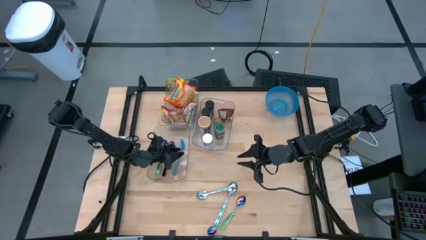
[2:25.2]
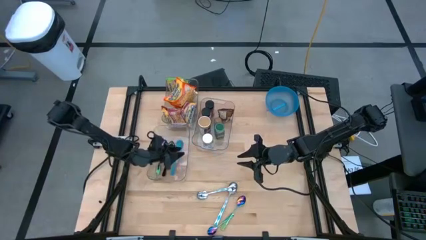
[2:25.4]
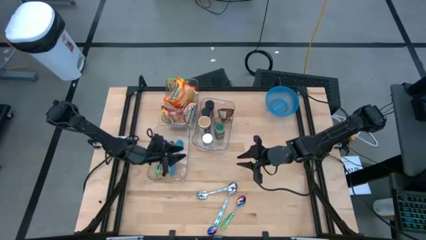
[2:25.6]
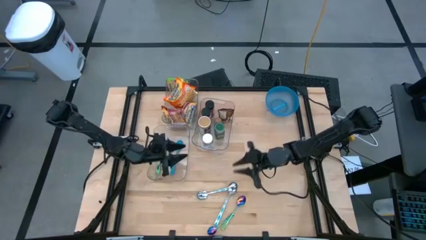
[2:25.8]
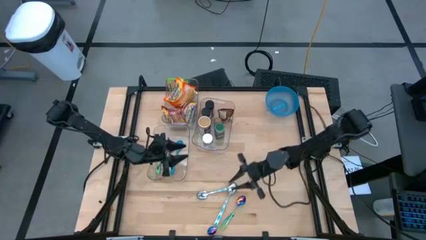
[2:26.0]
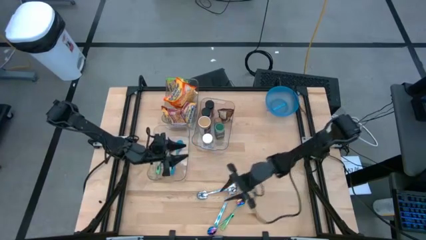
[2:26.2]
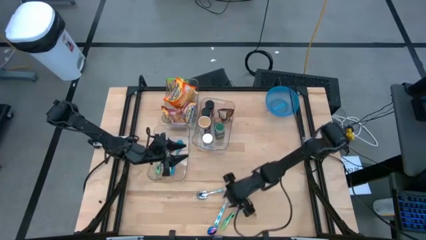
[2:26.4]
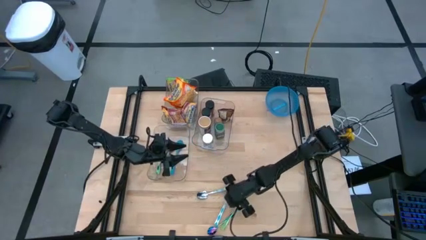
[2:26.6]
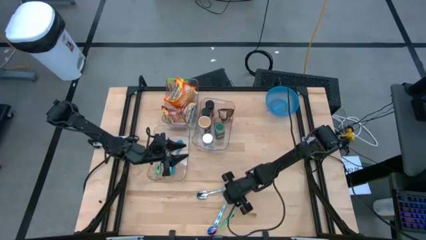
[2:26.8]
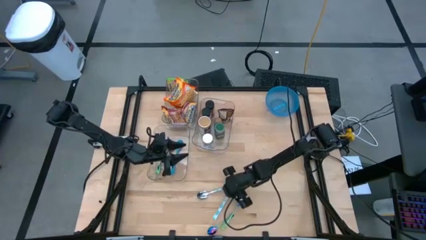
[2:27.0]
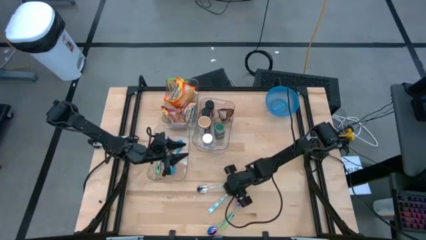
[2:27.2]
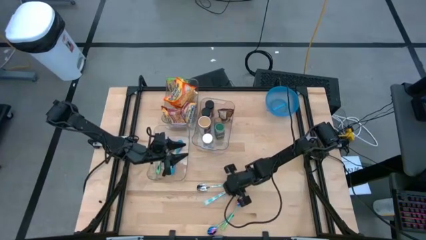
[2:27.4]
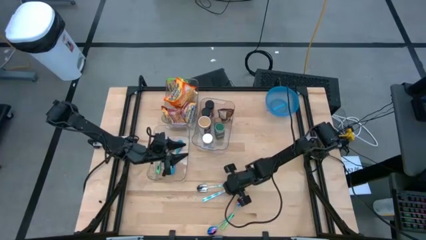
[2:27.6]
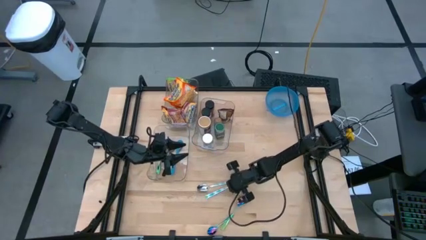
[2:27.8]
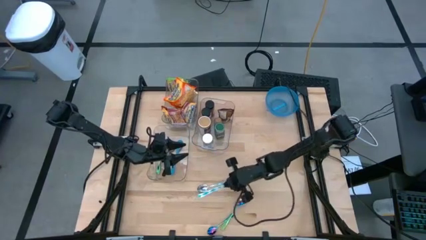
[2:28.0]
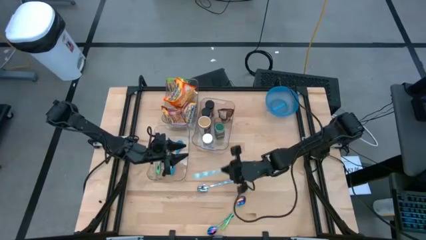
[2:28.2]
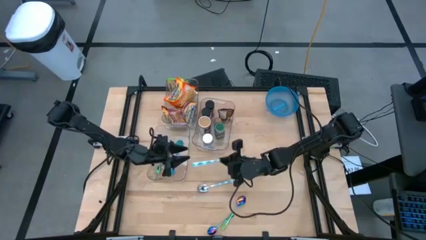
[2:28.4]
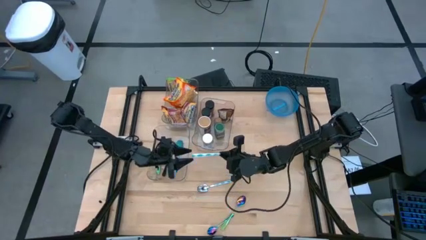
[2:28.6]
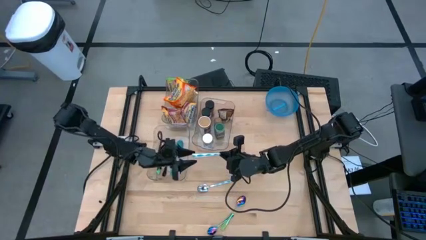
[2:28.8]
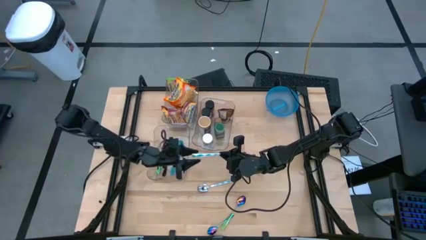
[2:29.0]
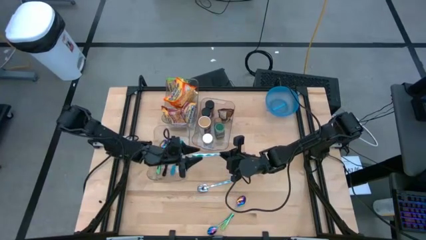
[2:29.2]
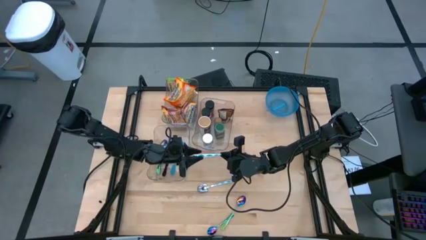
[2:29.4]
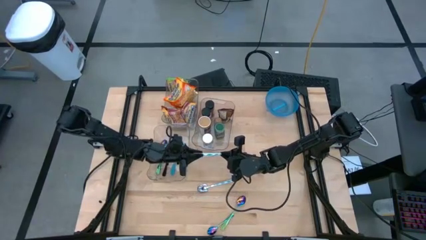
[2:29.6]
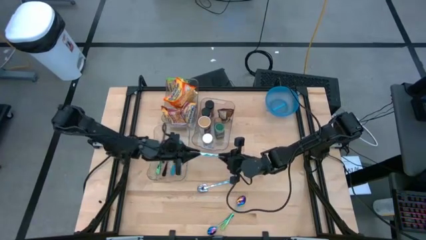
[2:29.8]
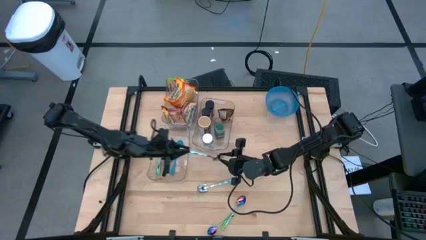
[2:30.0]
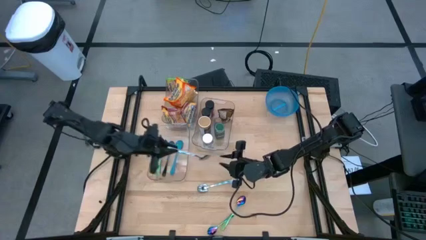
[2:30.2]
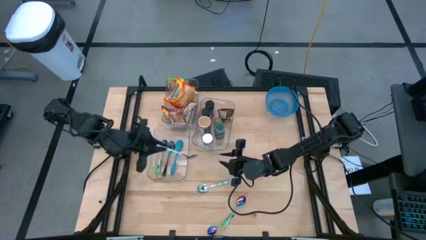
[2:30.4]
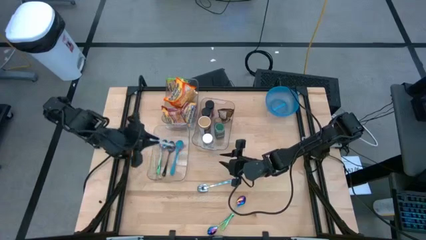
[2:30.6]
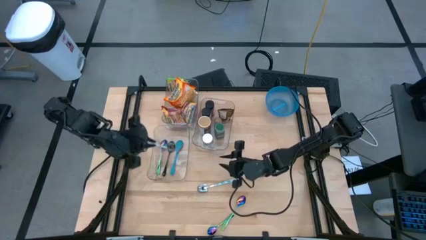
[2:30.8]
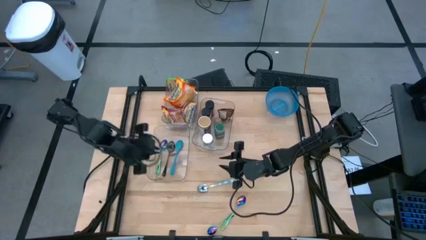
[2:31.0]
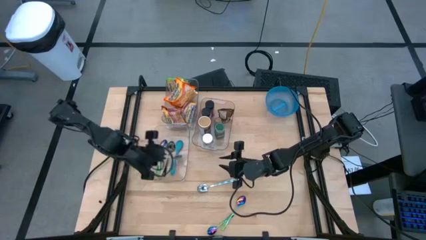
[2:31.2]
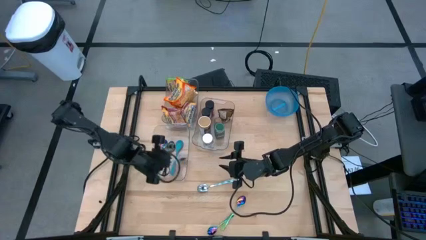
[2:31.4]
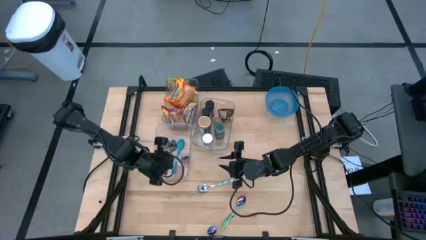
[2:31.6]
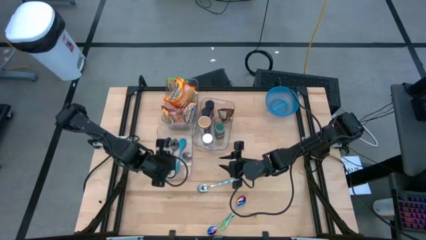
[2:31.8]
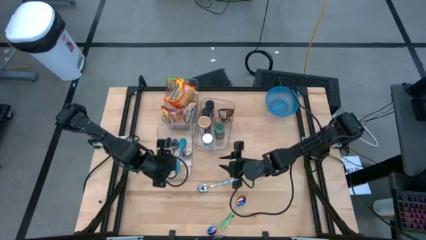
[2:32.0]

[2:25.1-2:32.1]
Task: Pick & Place Food Item
Put the right white patterned spoon into the bottom transparent bin

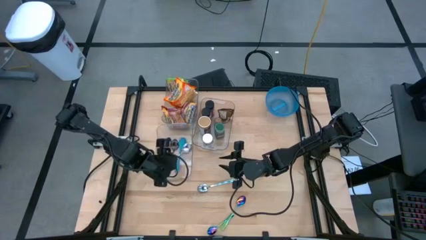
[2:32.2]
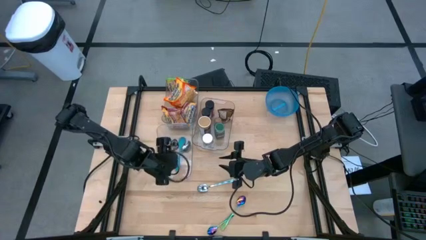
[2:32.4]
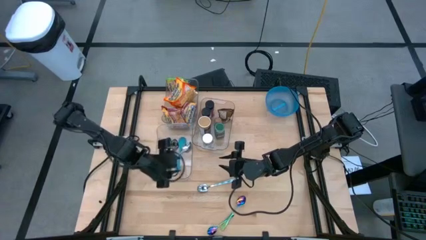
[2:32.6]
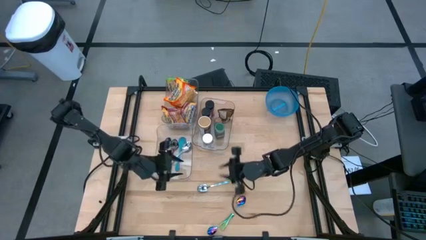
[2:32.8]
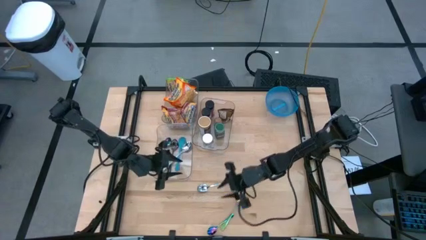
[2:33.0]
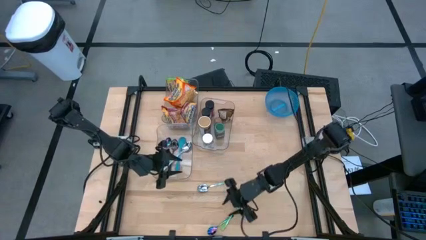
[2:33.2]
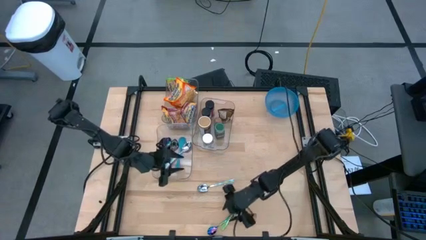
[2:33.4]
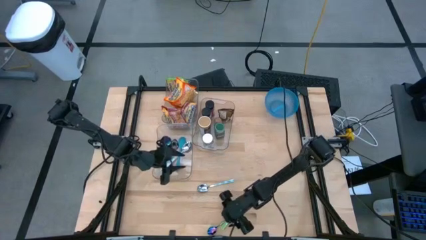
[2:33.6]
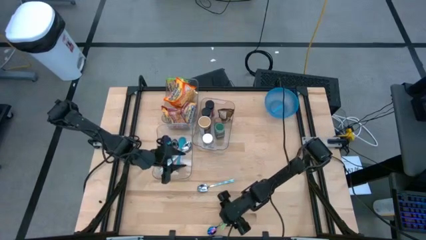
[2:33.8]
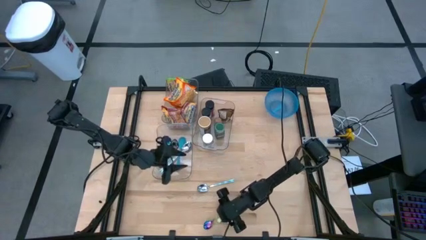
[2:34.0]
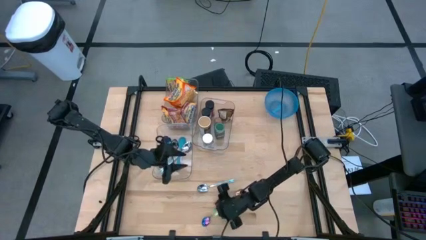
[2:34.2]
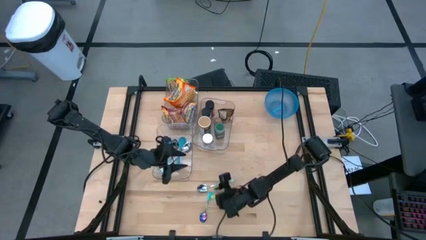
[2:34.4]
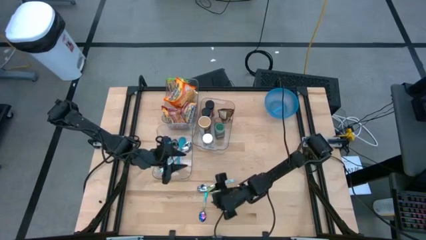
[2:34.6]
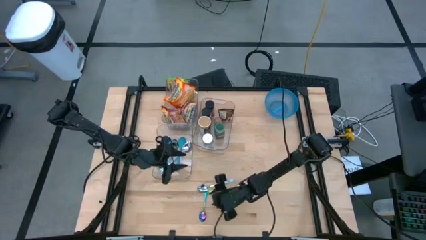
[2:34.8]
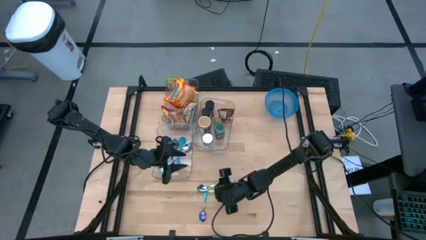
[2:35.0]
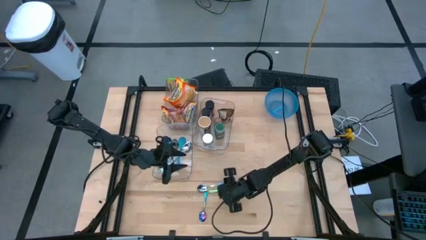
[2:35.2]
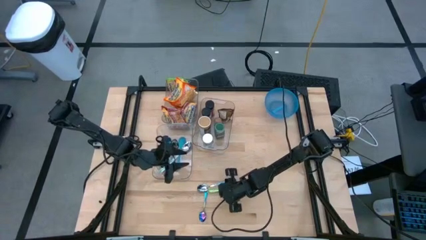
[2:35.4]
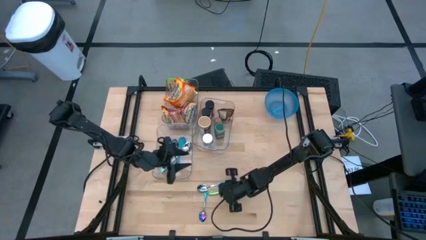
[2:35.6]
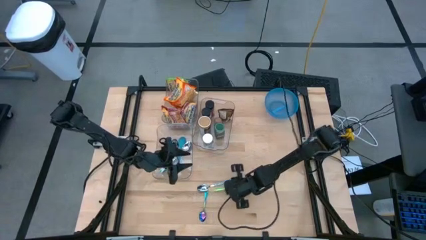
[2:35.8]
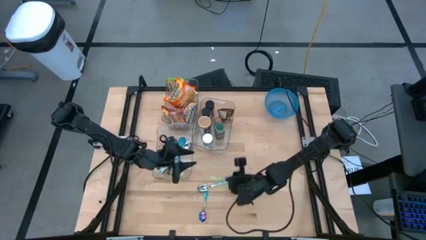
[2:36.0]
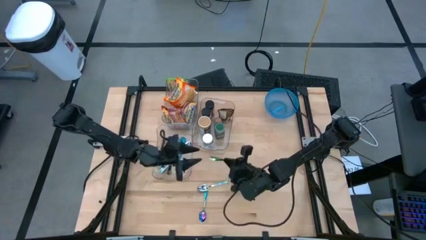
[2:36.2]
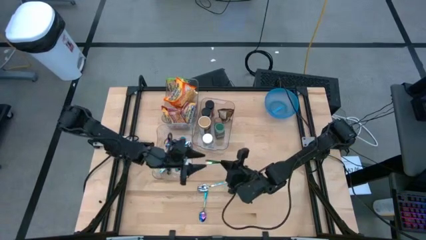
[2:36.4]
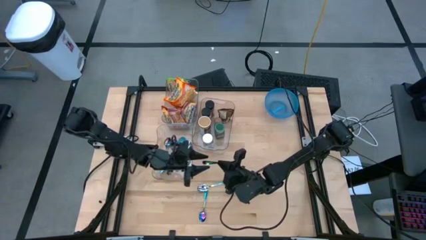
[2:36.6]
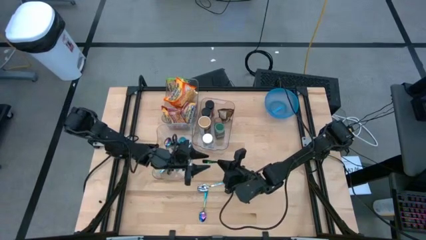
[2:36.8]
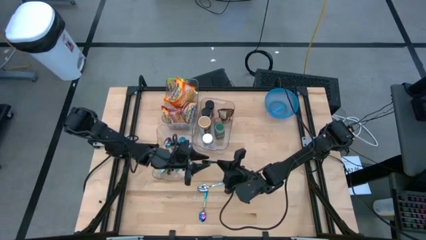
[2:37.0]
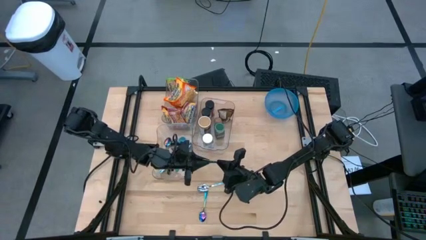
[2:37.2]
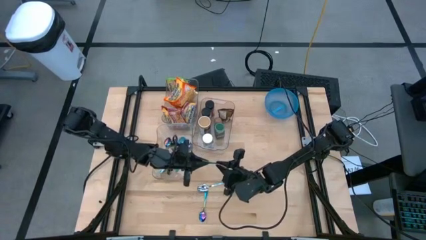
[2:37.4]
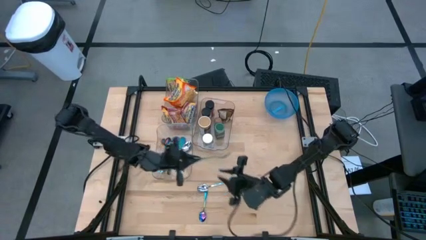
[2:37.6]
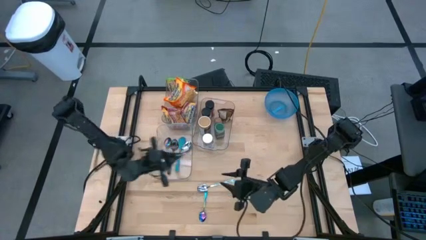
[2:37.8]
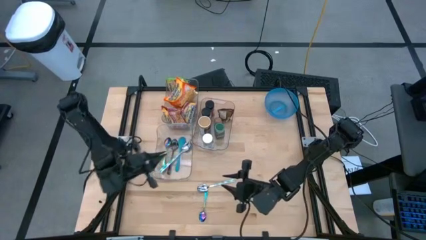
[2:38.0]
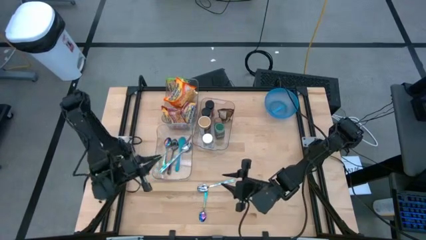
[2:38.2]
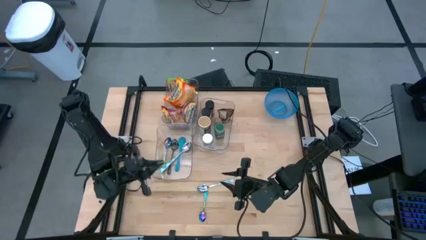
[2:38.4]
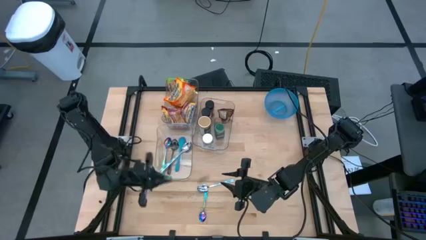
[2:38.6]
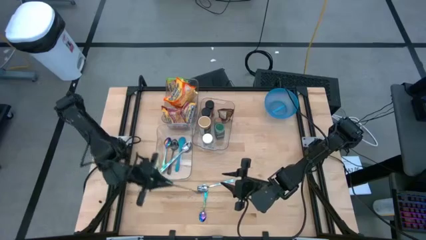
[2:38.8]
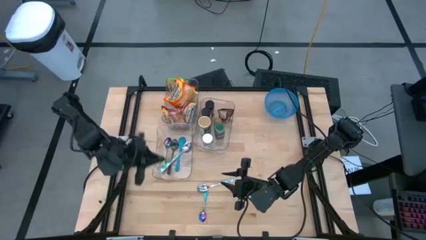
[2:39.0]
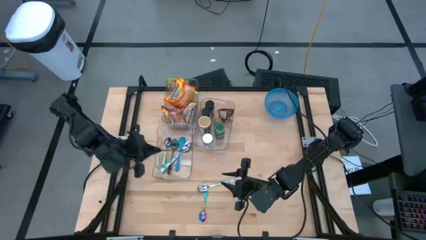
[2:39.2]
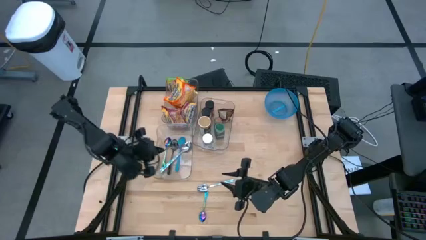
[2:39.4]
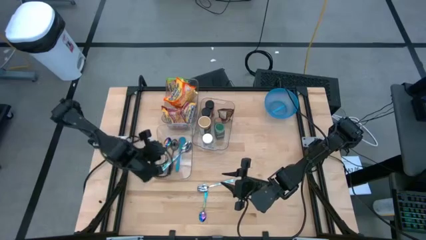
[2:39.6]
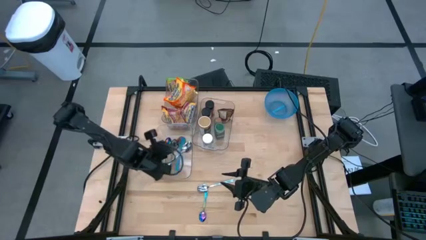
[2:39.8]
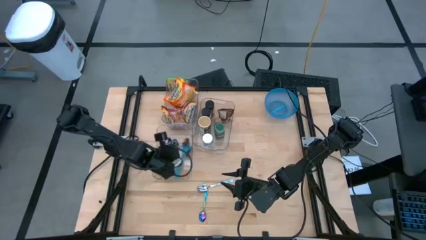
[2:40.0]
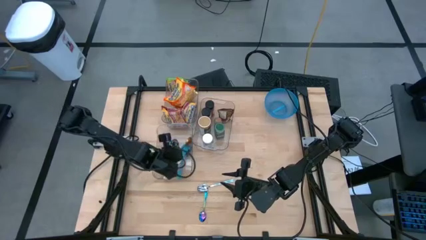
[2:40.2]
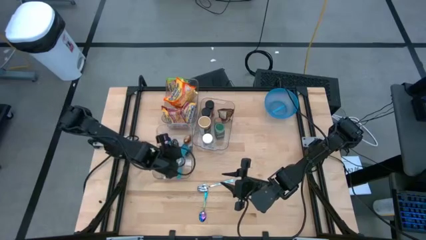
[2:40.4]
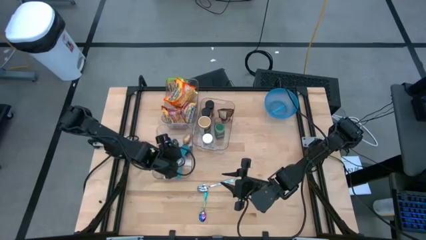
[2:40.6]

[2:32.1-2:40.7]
Put the top purple spoon into the bottom transparent bin
